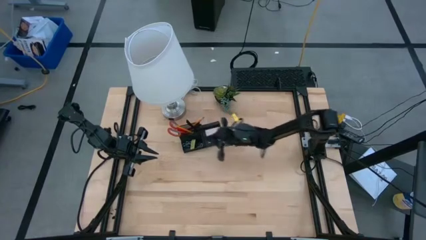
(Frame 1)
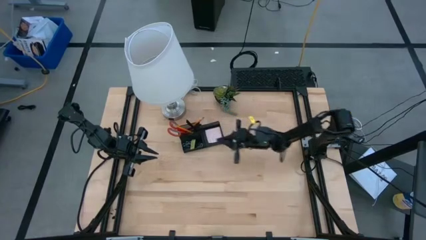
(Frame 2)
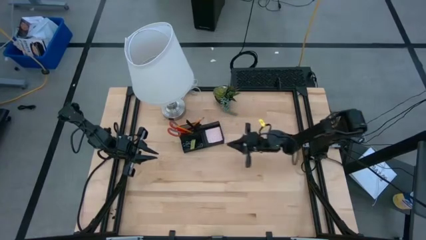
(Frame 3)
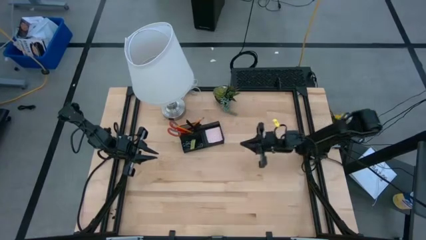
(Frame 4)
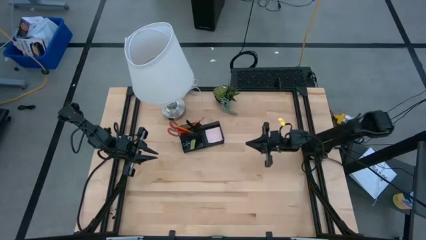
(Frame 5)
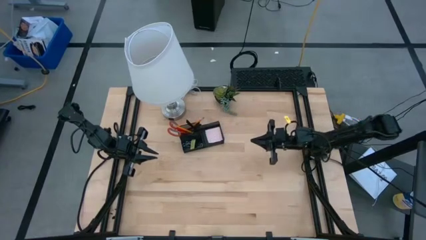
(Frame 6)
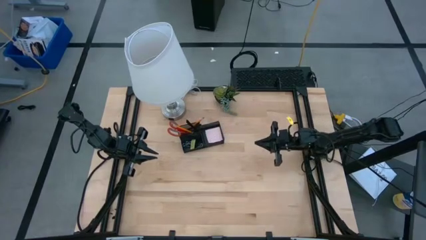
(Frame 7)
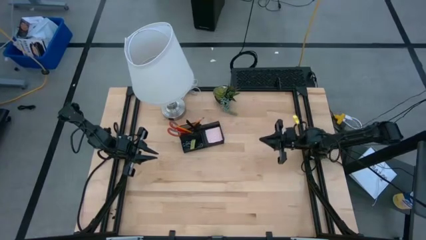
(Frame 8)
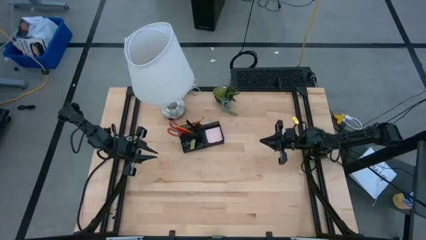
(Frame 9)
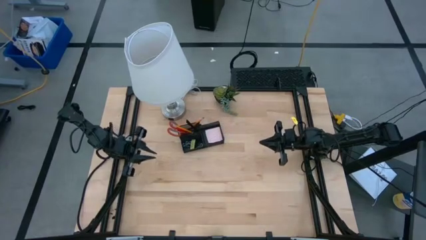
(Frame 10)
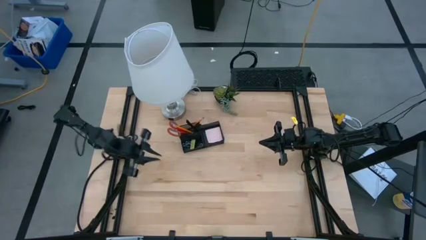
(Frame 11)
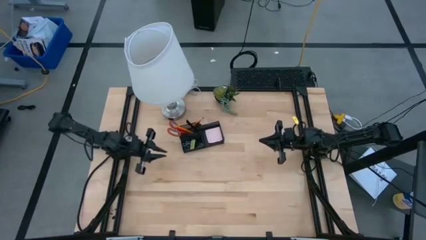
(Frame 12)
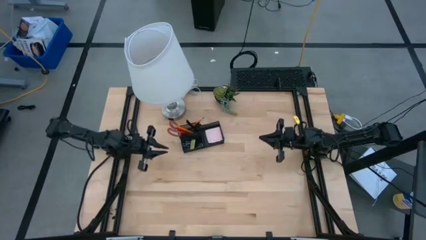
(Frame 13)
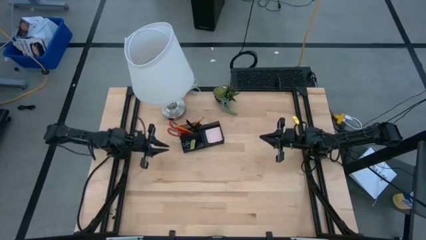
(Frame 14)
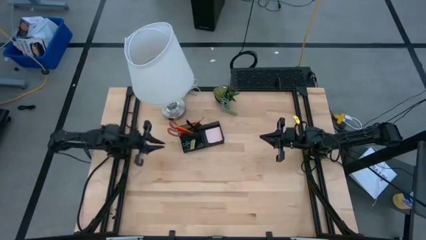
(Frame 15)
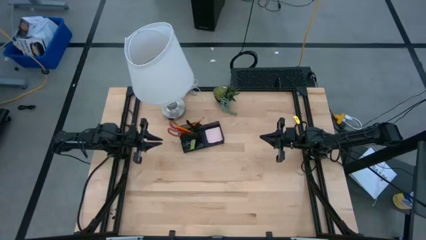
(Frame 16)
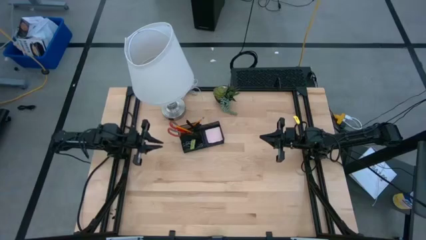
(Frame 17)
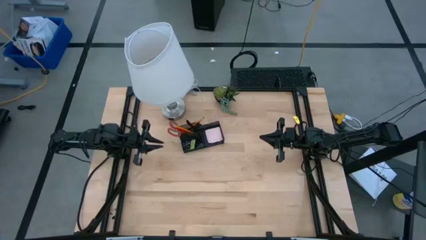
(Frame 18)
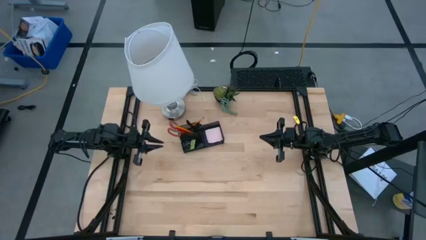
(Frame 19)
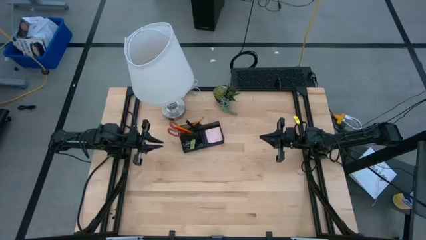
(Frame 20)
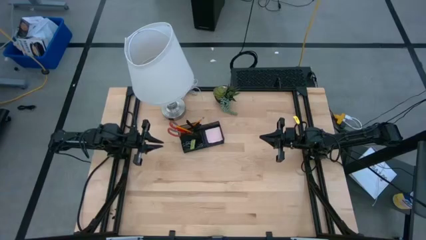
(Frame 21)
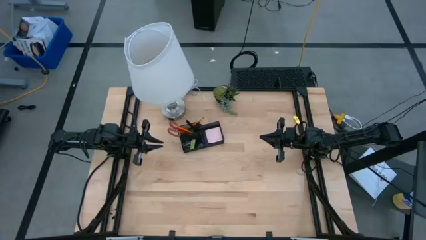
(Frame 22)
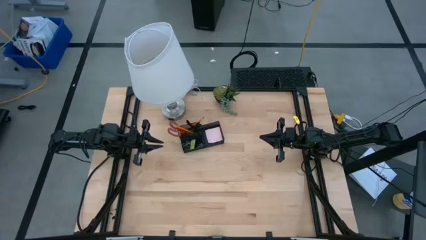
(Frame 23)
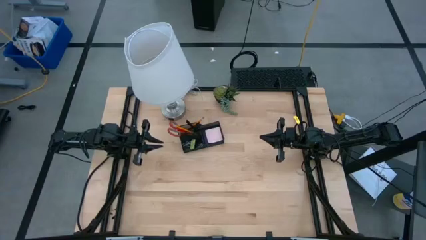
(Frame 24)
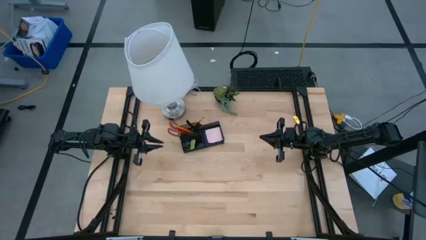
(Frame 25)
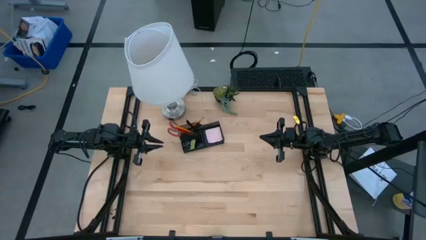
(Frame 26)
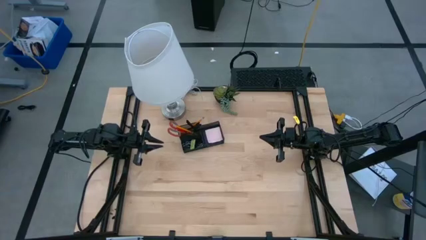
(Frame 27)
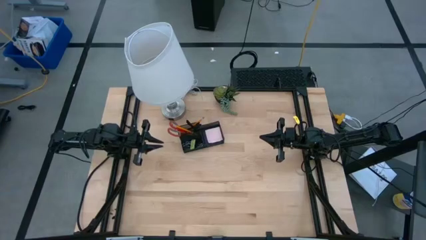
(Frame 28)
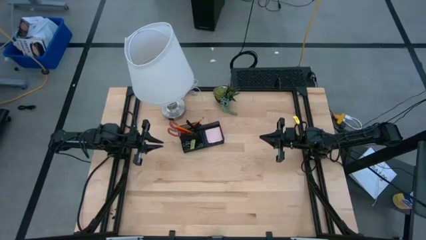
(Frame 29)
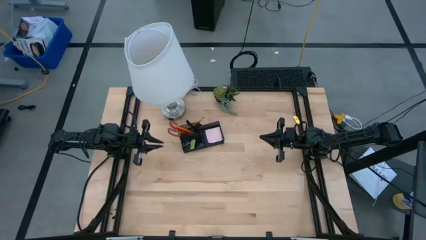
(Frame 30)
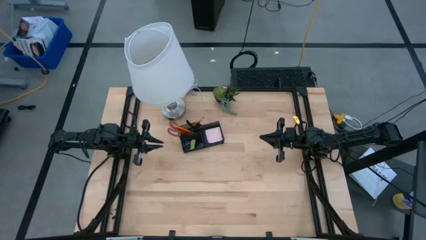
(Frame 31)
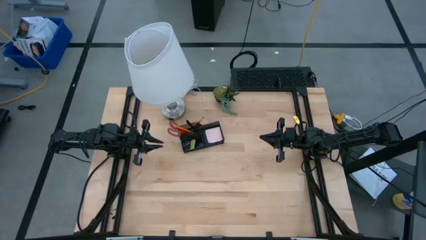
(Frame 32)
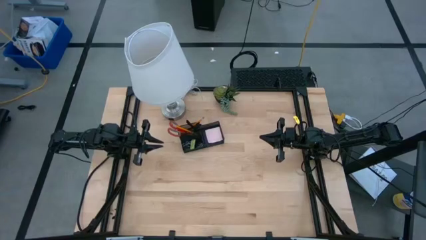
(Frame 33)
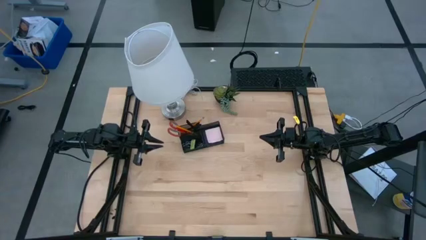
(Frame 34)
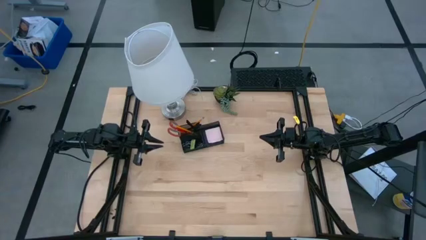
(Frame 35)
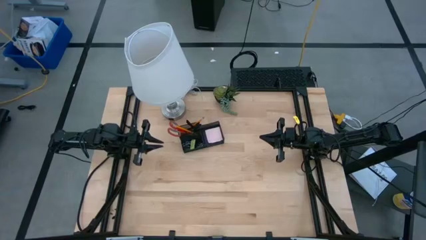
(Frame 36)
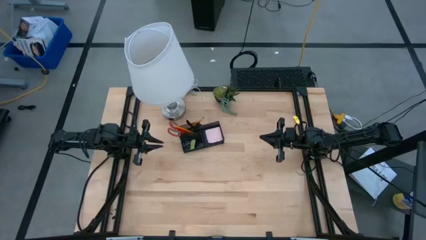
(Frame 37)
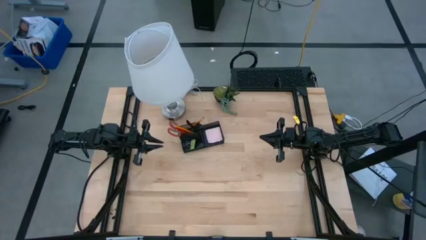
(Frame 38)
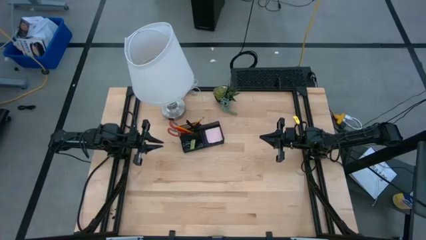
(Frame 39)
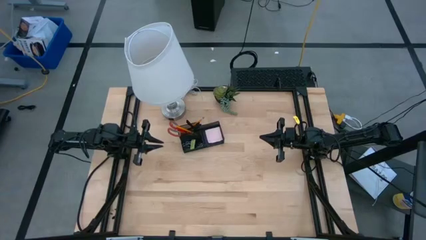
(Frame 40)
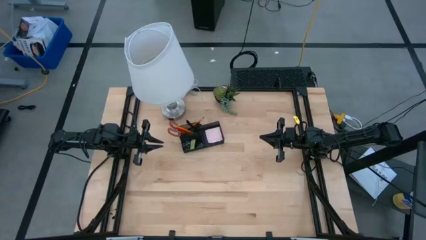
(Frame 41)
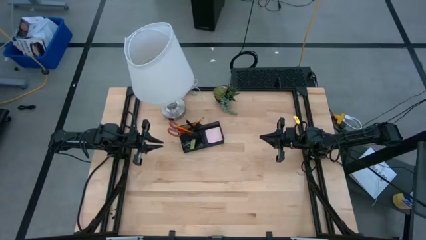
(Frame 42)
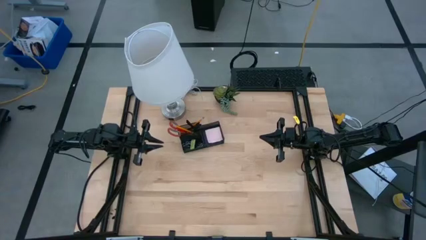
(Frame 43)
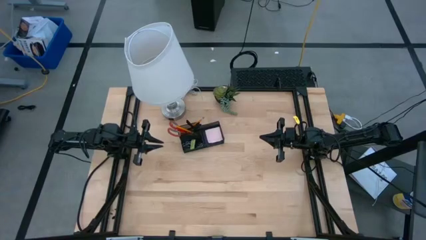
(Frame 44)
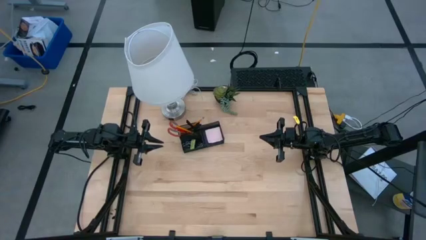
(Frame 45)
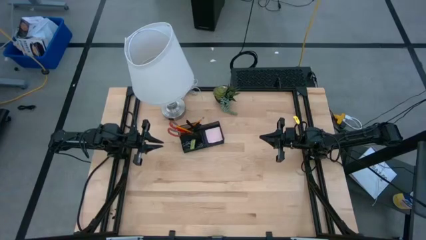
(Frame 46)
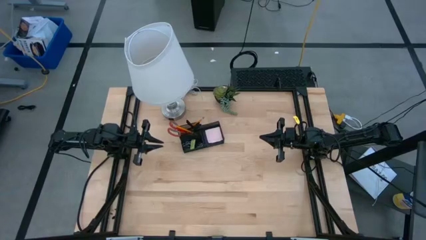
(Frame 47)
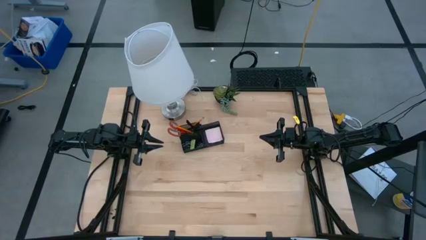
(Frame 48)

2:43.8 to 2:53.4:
Task: Pick and place office supplies into organizer
Return to Home Position
